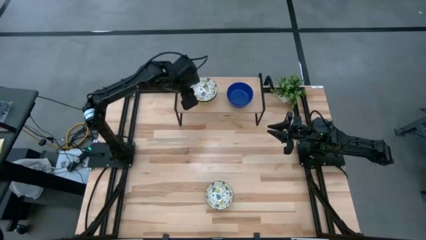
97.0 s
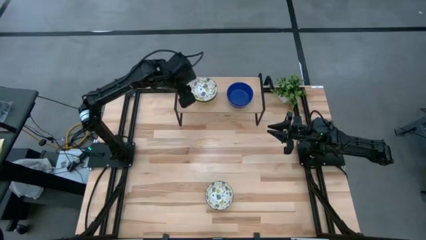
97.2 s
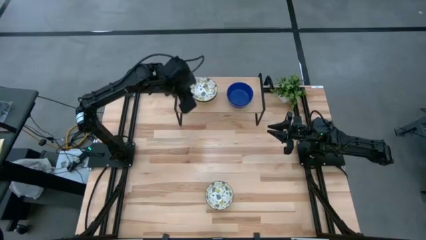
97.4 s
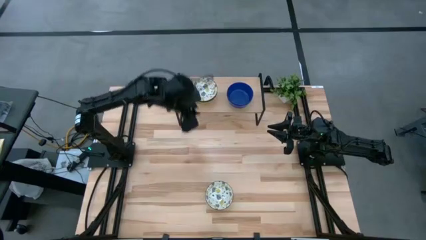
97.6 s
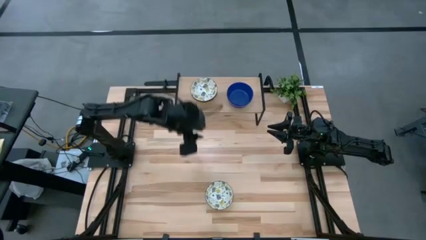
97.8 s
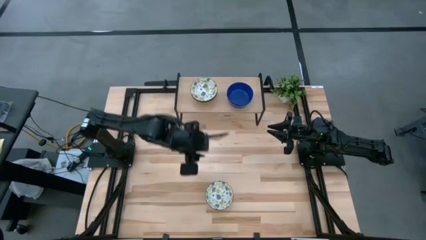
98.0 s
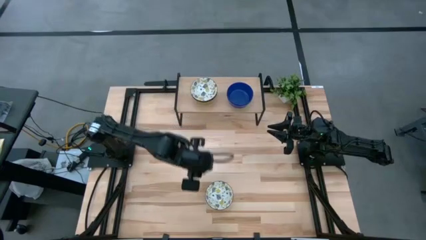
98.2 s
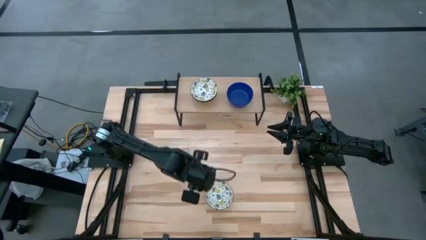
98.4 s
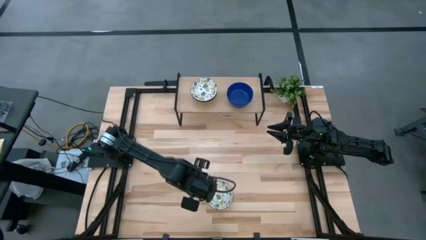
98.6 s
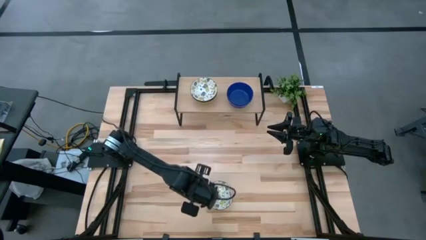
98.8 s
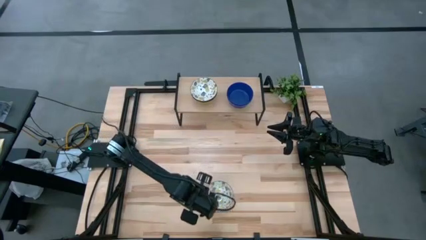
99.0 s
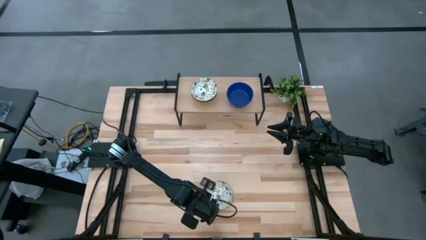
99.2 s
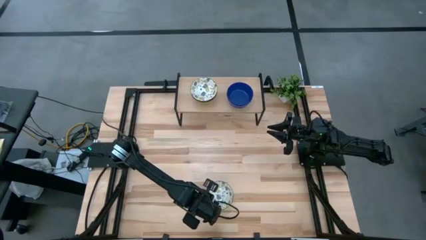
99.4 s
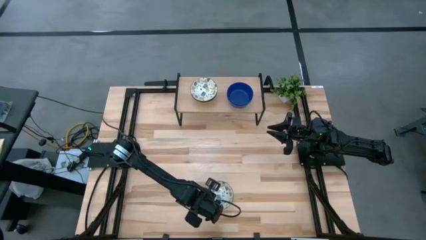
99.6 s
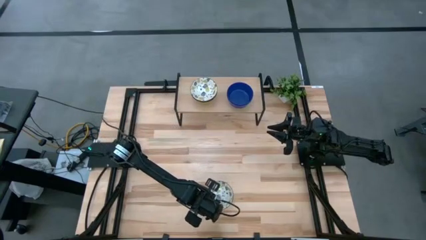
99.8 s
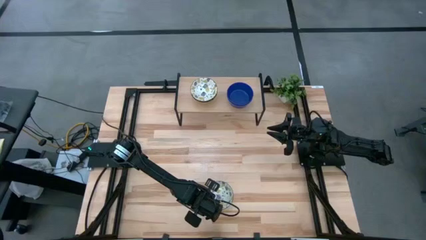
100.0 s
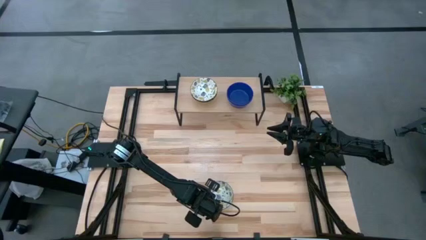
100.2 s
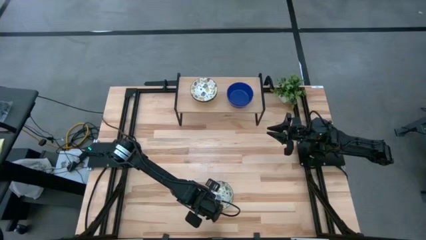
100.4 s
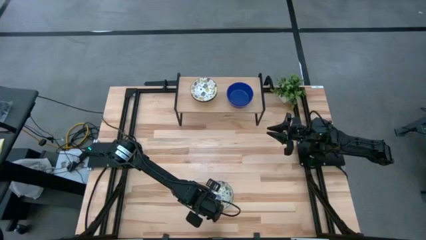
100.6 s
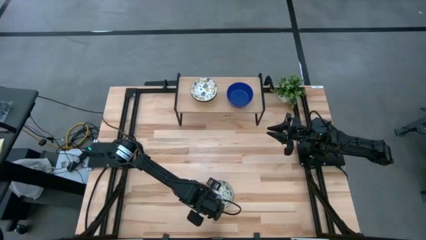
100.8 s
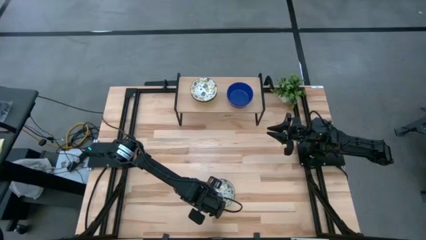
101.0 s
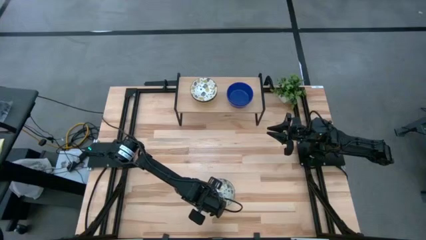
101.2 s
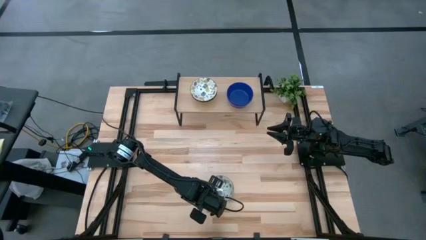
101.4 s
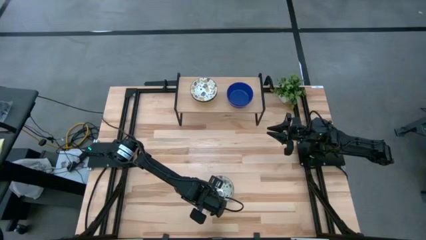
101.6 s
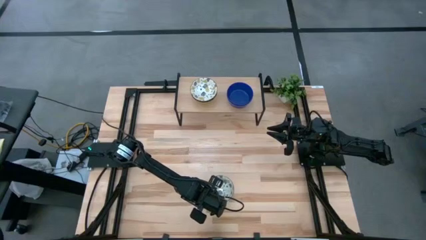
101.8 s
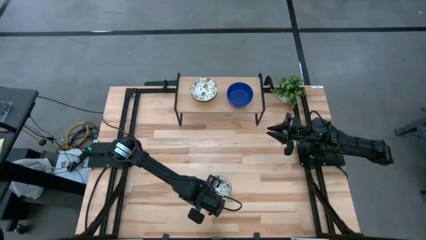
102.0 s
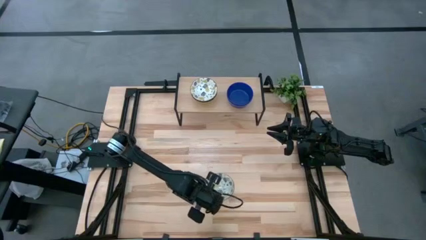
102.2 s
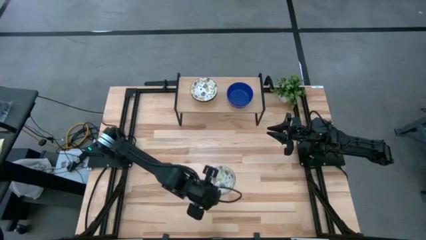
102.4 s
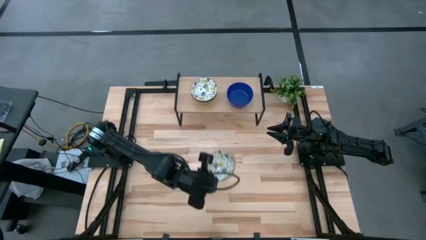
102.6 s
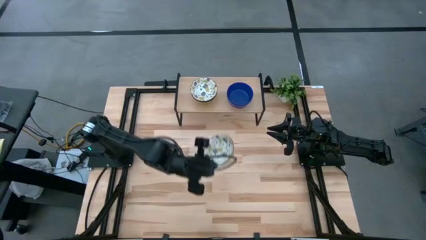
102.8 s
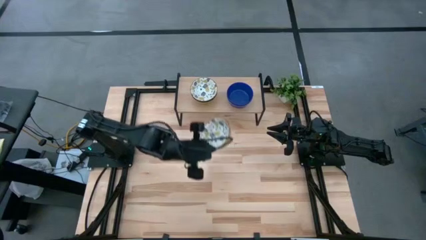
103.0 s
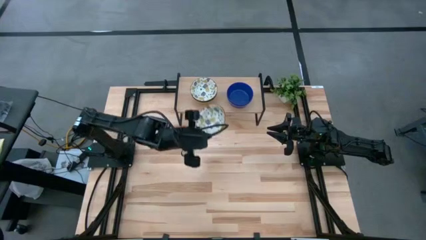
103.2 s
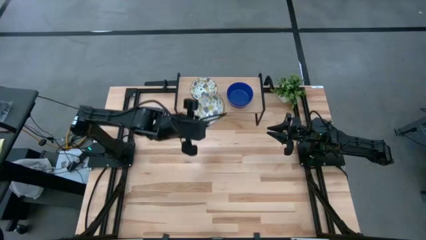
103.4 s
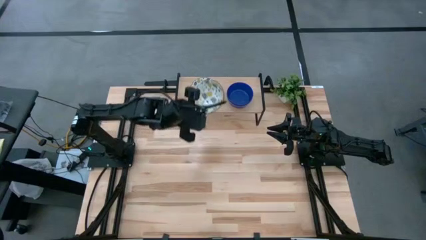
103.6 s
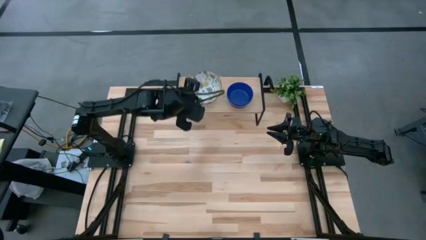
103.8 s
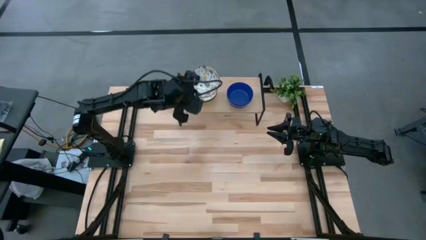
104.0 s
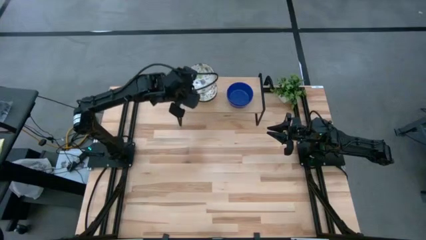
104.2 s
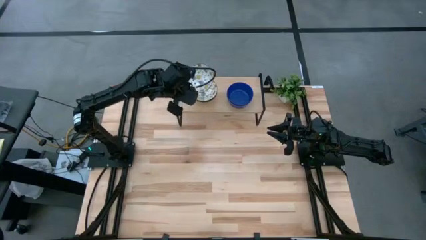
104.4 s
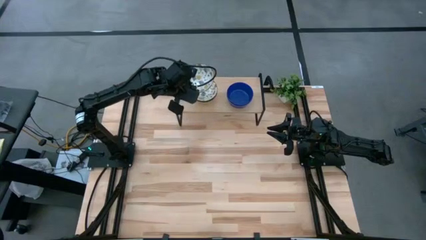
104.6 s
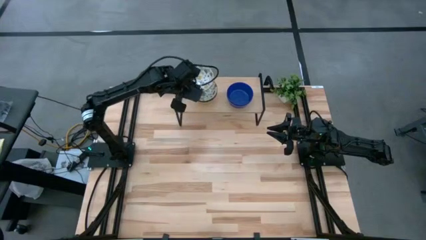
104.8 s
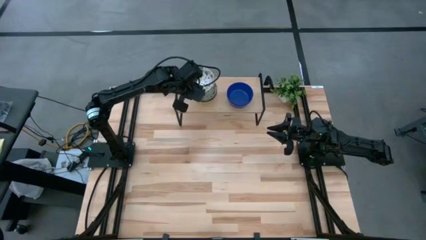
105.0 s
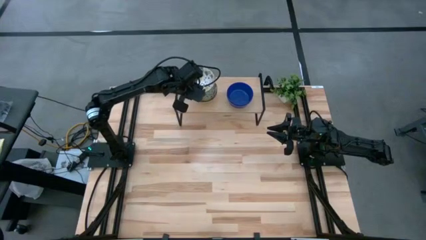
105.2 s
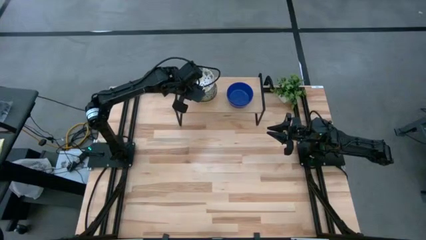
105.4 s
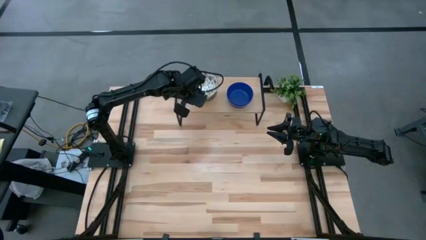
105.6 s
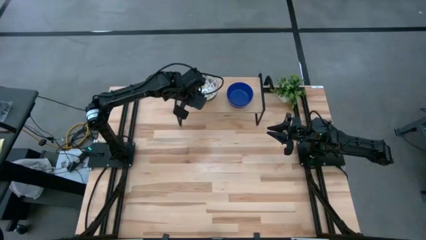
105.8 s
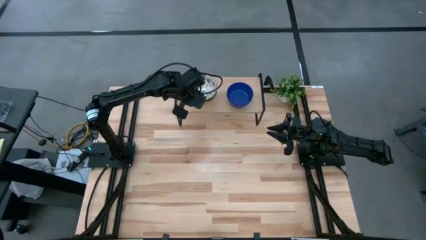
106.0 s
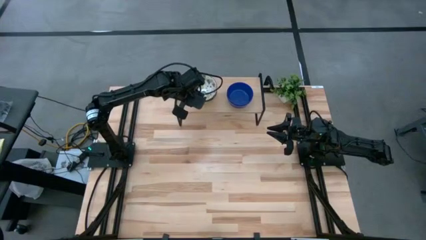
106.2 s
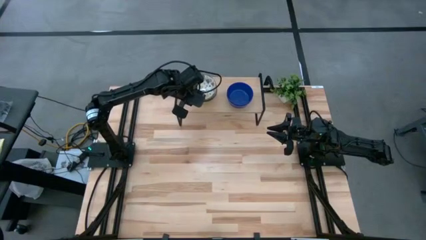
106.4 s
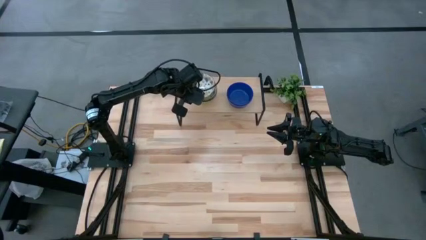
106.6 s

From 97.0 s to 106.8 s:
Task: Pick & Place Mini bowls
Stack the white patterned bowl on the white patterned bowl on the shelf

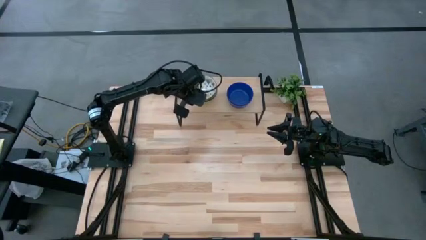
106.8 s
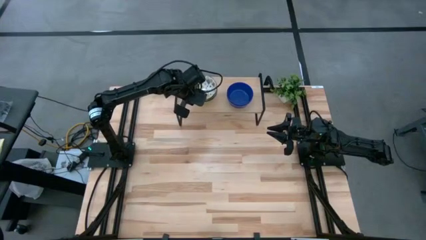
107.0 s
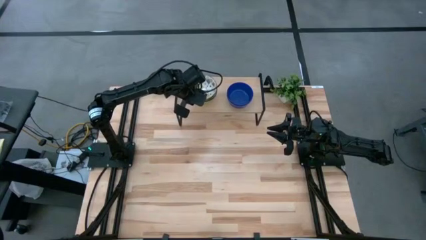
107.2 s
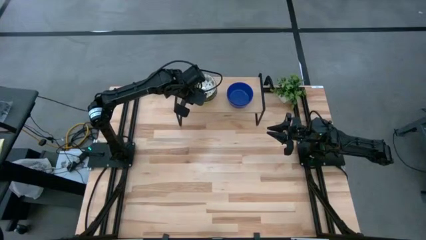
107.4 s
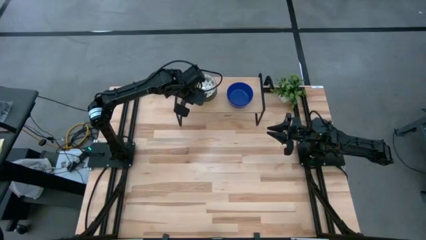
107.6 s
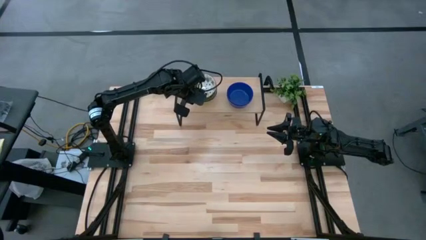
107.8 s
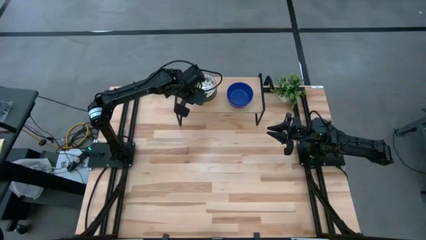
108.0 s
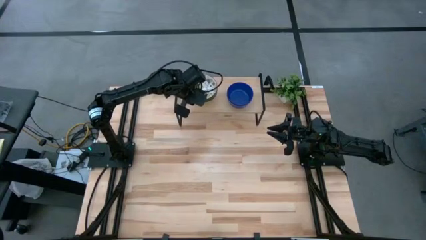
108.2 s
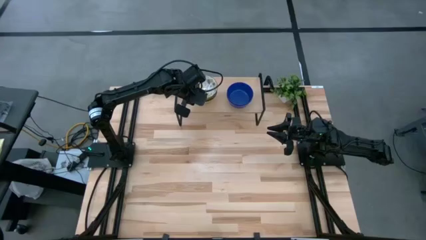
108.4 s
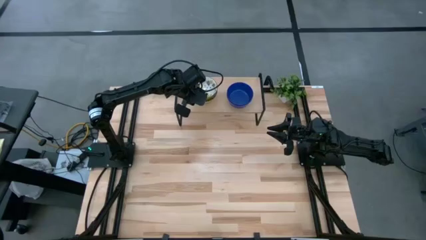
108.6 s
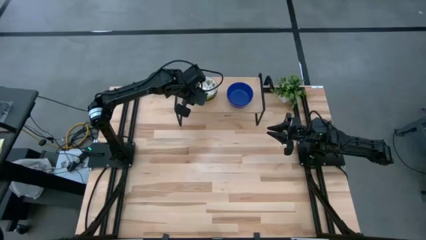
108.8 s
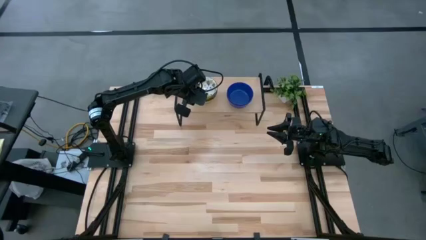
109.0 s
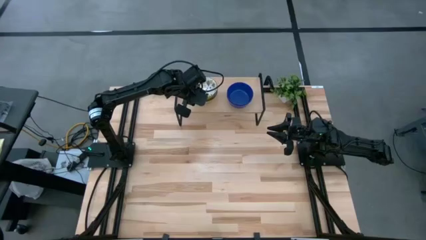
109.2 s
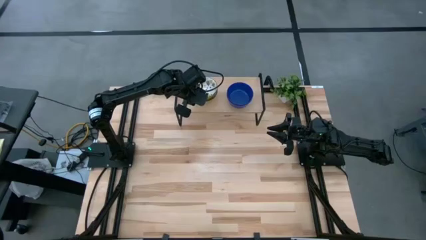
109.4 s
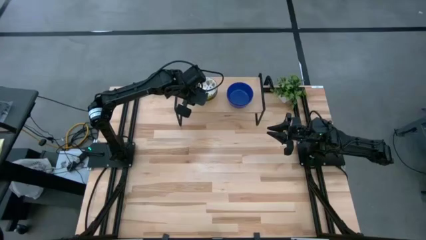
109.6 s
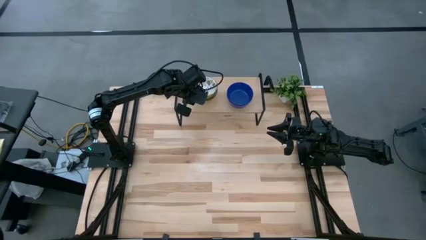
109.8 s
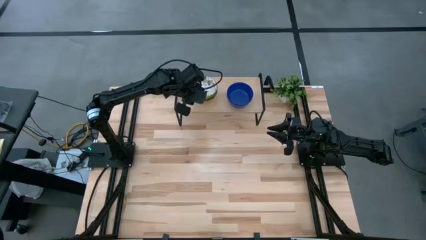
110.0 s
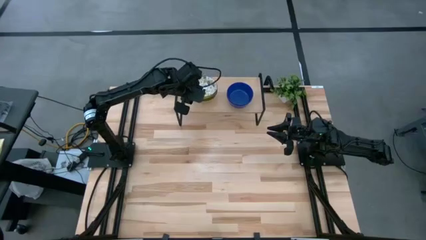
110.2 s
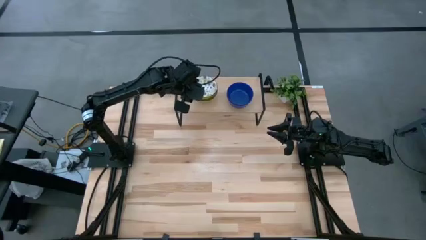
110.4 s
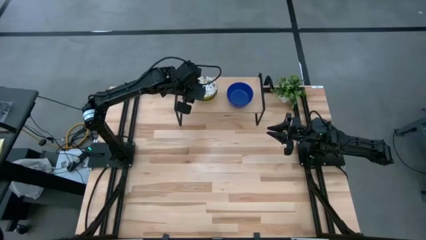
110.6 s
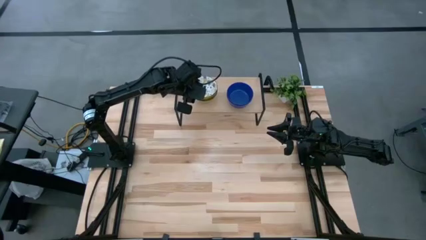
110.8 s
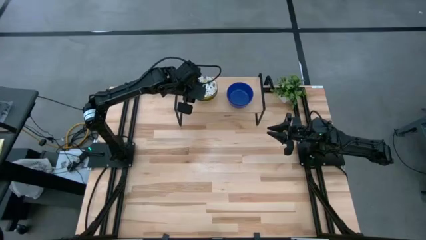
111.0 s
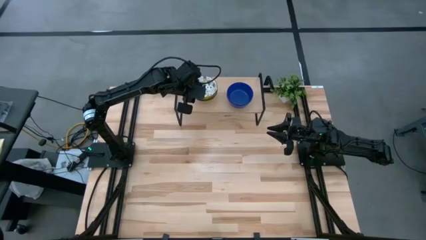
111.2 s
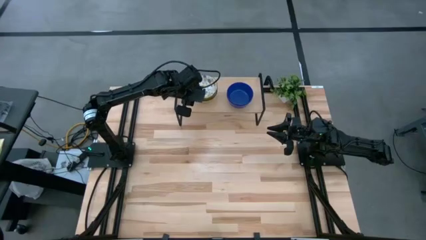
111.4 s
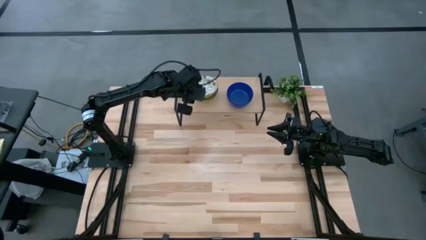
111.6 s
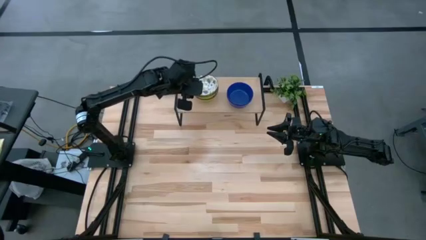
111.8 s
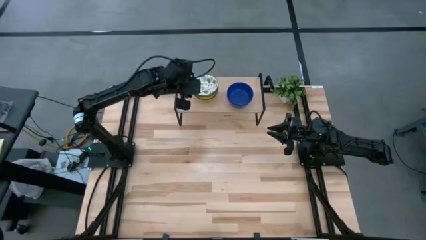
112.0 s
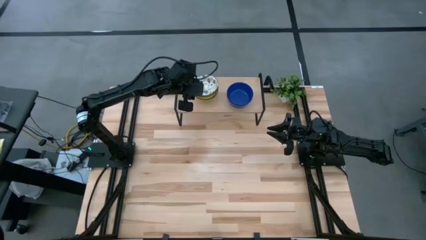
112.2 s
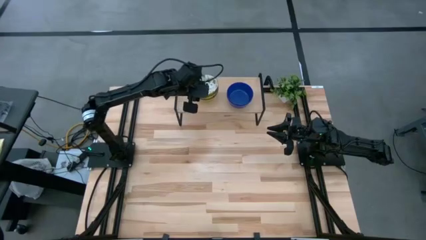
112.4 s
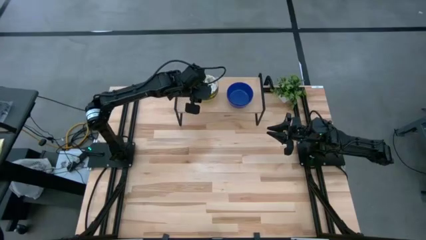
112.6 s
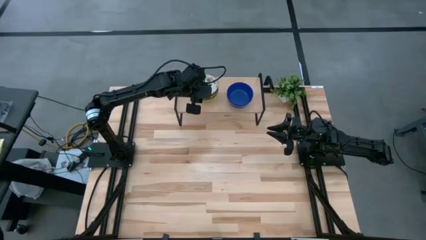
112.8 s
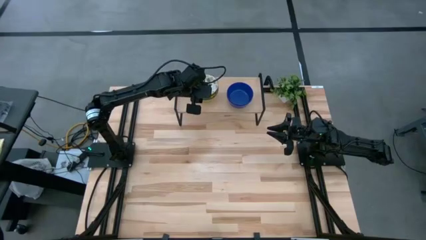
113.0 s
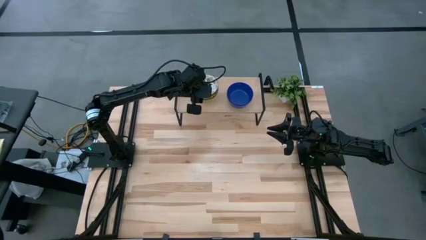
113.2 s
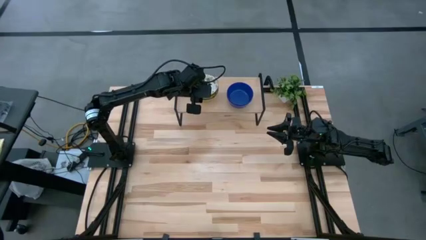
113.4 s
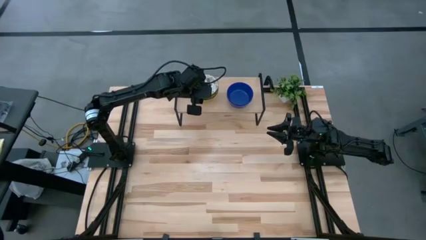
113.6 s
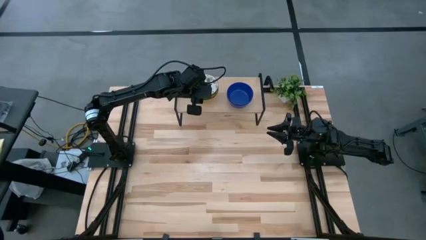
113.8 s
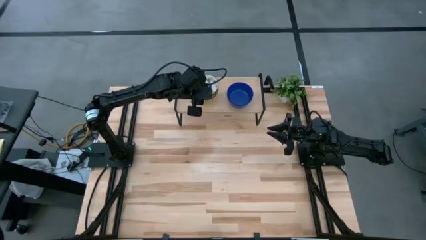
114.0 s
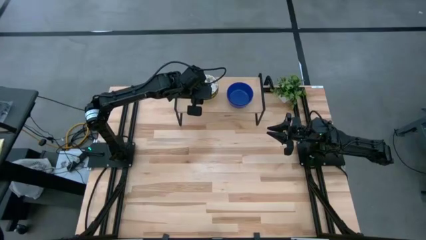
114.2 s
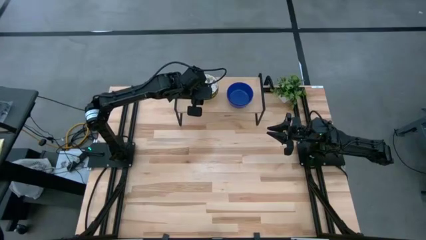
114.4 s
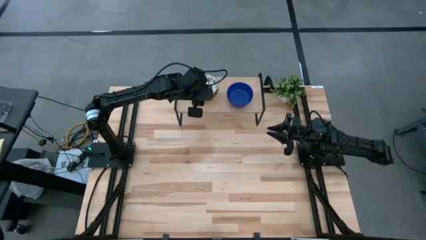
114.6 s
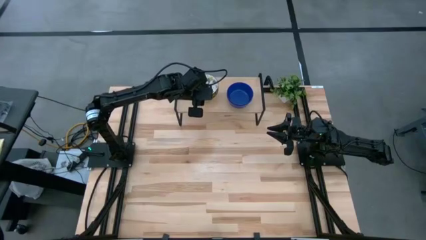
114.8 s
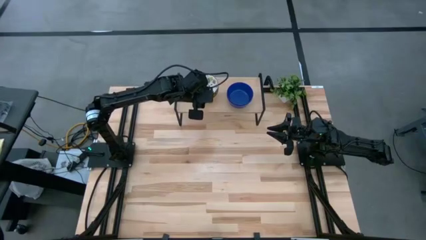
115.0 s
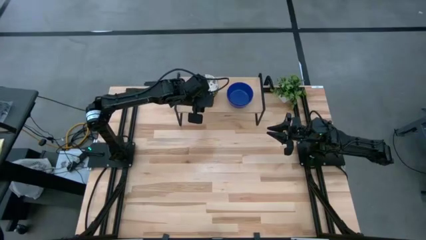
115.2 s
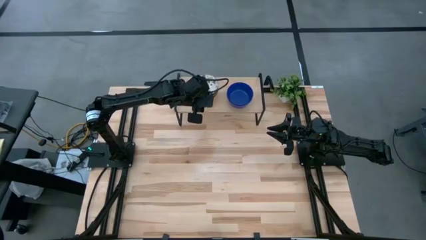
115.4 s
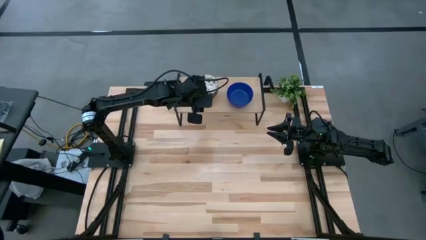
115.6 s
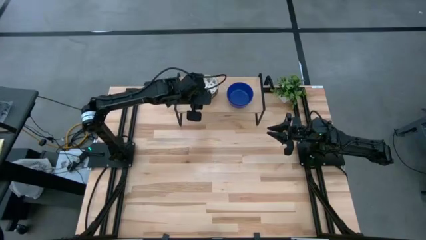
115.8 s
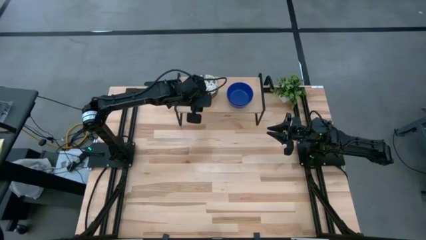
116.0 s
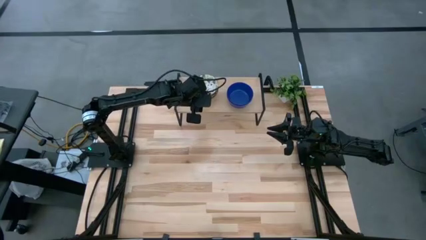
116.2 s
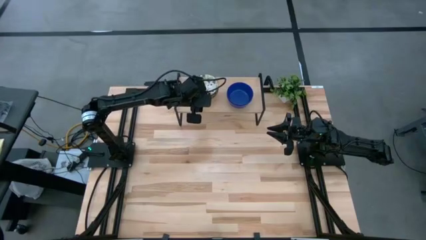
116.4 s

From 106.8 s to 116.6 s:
Stack the white patterned bowl on the white patterned bowl on the shelf
